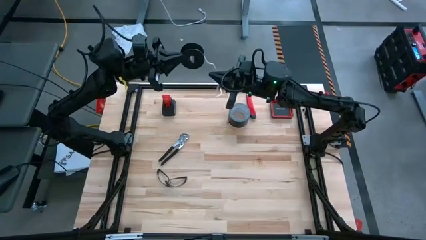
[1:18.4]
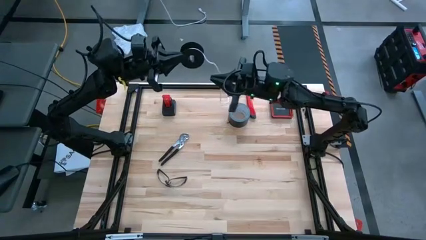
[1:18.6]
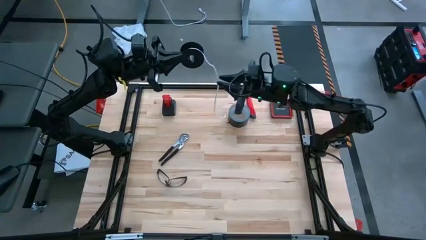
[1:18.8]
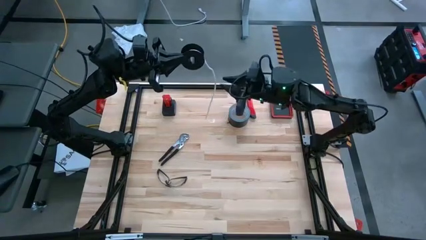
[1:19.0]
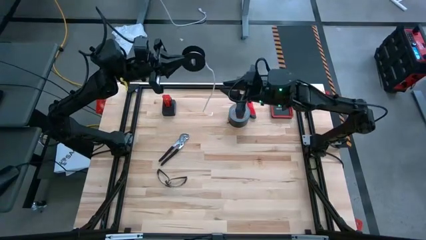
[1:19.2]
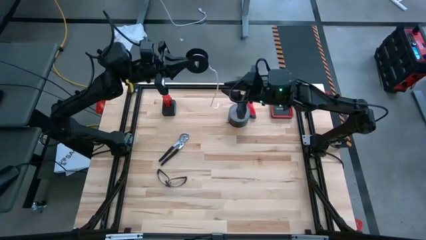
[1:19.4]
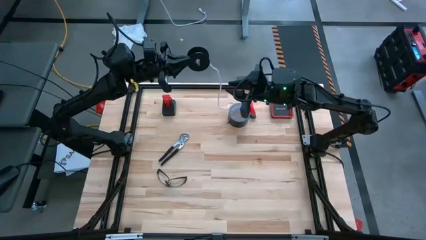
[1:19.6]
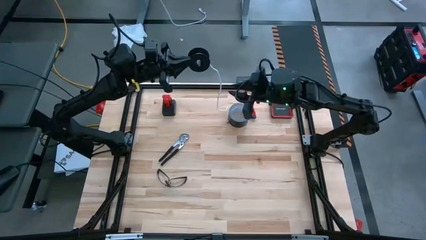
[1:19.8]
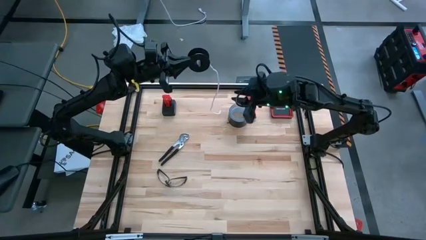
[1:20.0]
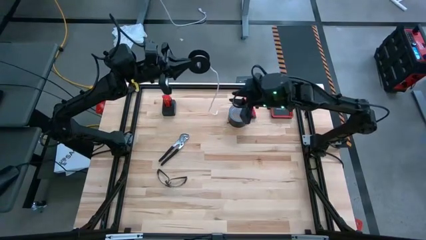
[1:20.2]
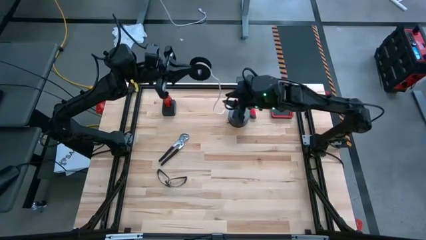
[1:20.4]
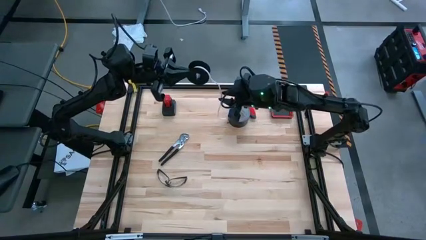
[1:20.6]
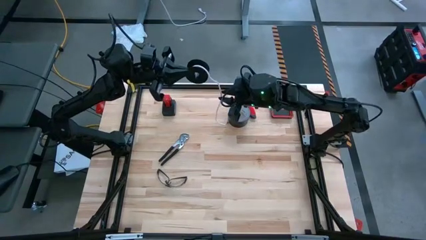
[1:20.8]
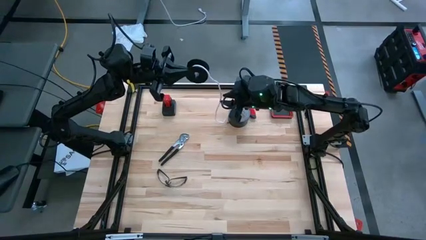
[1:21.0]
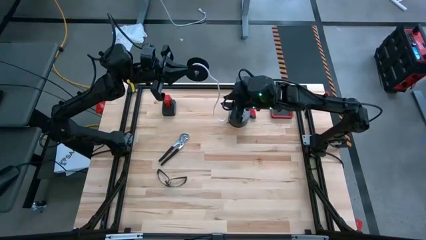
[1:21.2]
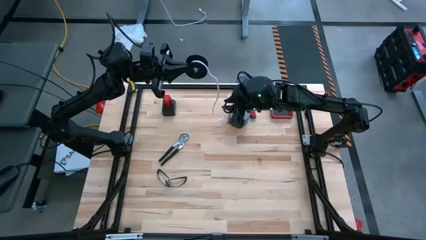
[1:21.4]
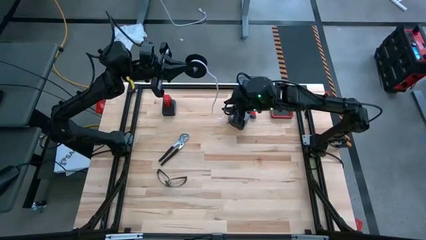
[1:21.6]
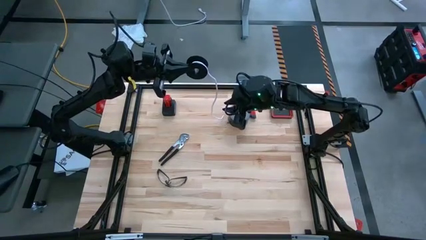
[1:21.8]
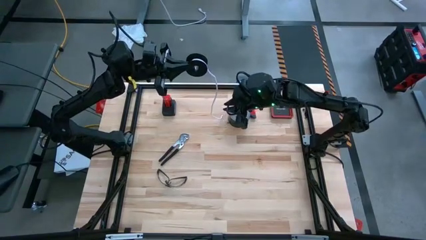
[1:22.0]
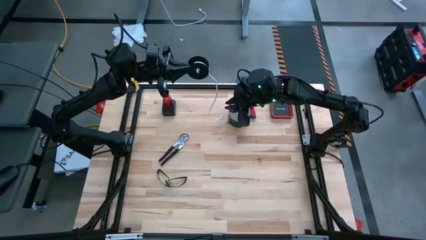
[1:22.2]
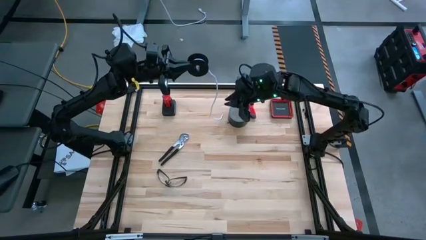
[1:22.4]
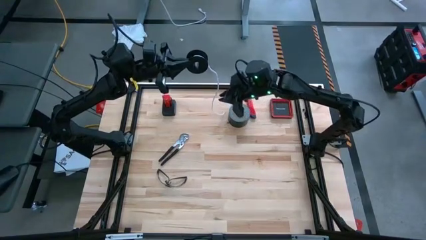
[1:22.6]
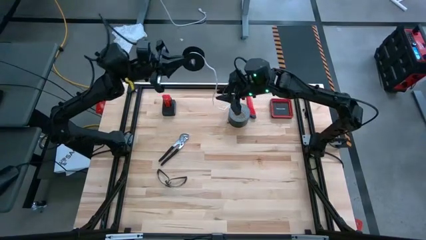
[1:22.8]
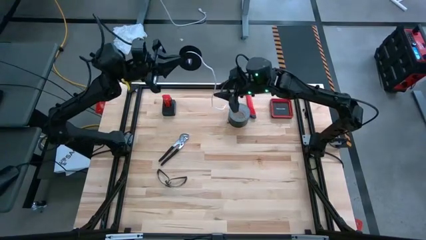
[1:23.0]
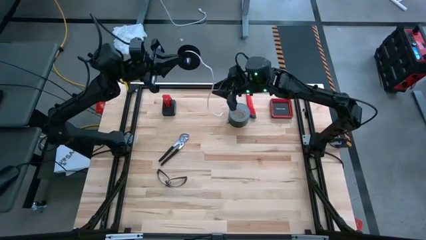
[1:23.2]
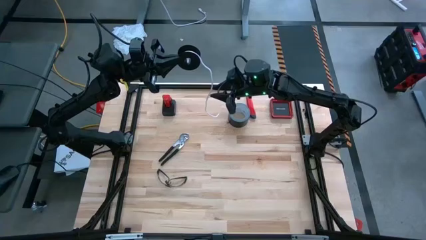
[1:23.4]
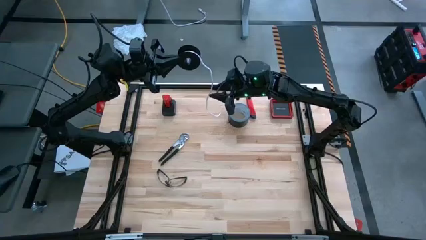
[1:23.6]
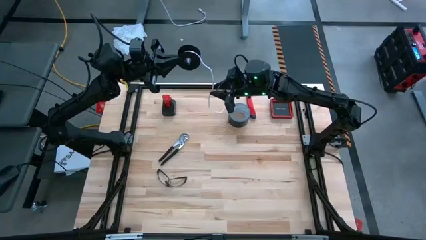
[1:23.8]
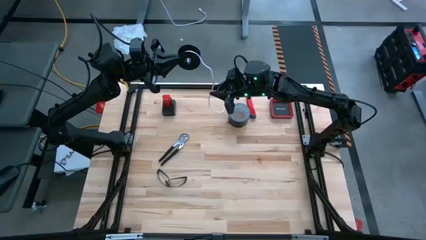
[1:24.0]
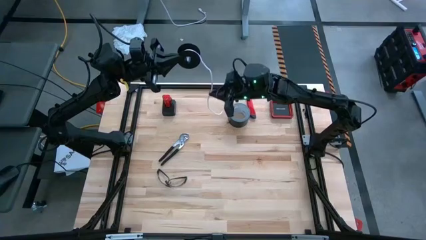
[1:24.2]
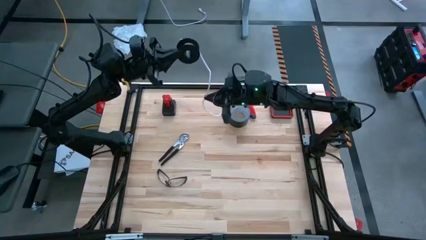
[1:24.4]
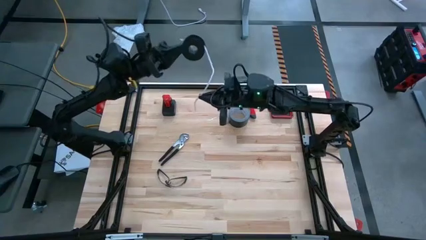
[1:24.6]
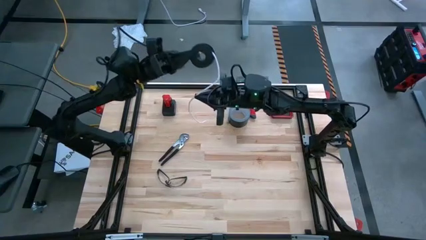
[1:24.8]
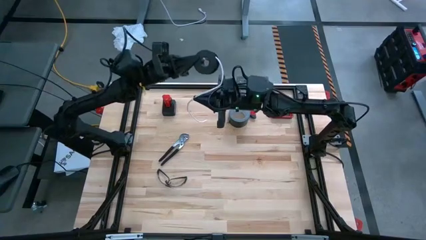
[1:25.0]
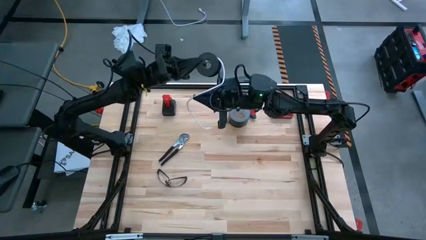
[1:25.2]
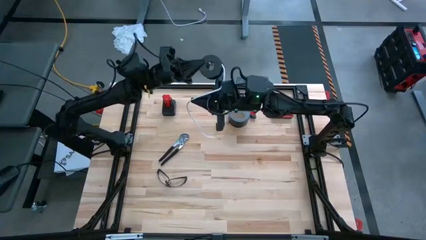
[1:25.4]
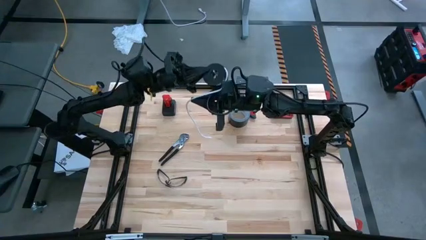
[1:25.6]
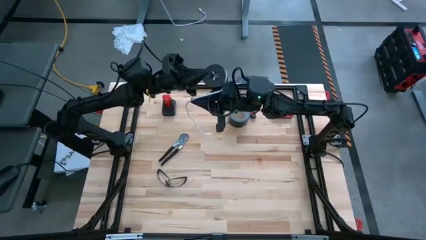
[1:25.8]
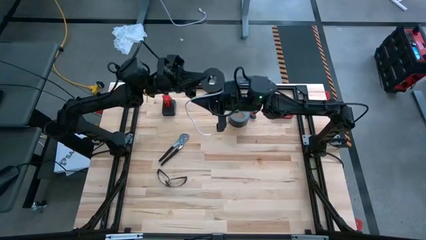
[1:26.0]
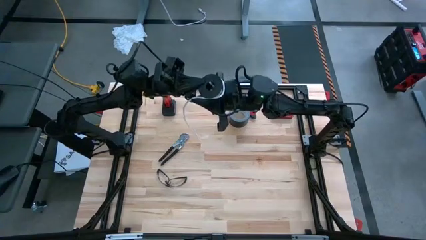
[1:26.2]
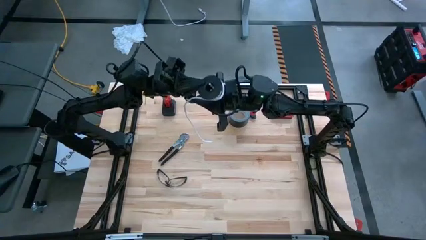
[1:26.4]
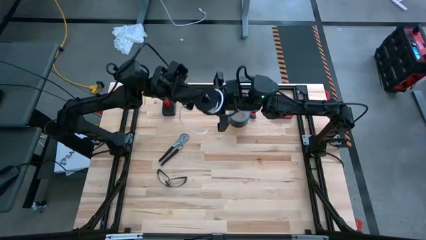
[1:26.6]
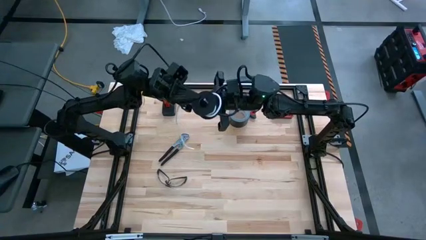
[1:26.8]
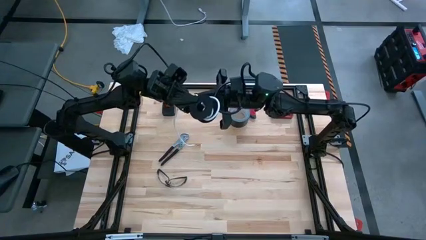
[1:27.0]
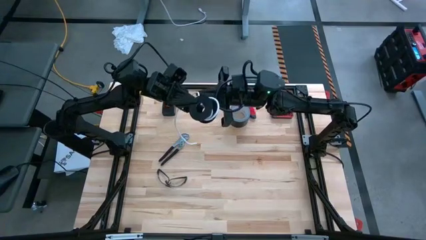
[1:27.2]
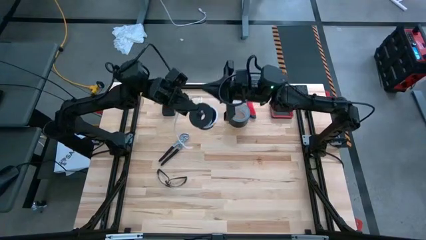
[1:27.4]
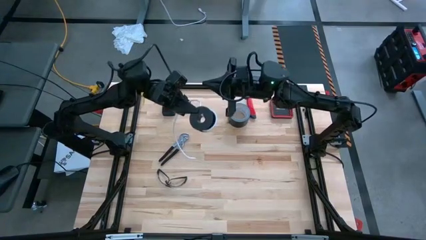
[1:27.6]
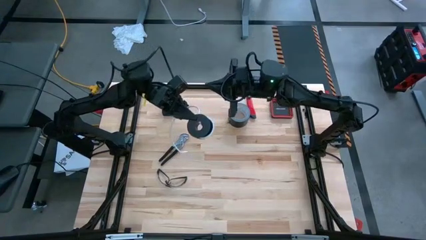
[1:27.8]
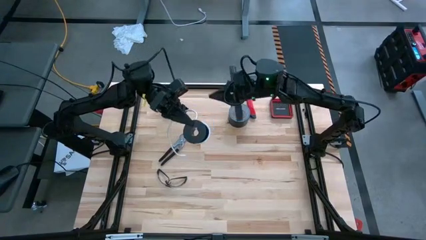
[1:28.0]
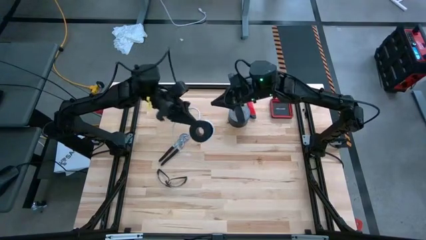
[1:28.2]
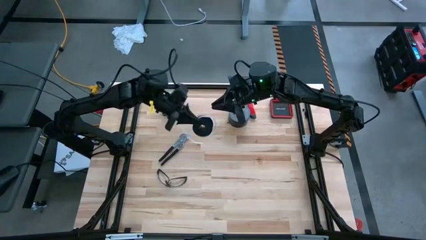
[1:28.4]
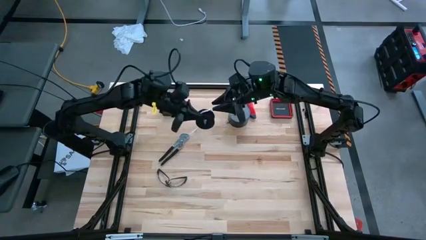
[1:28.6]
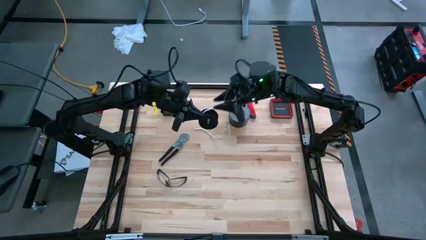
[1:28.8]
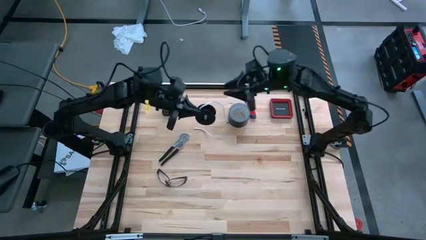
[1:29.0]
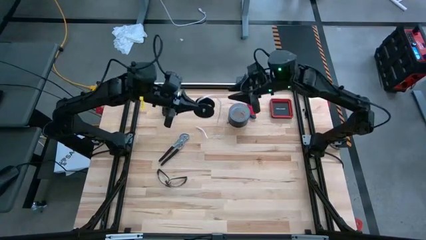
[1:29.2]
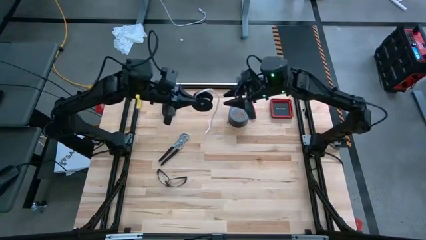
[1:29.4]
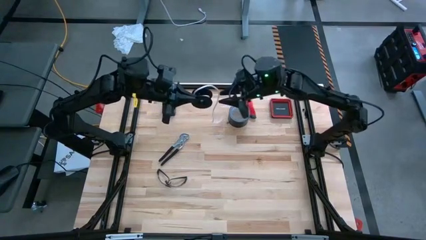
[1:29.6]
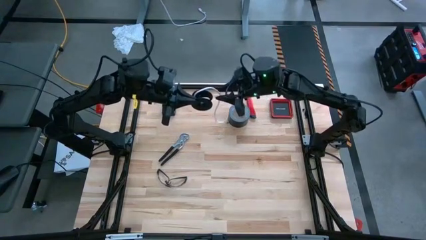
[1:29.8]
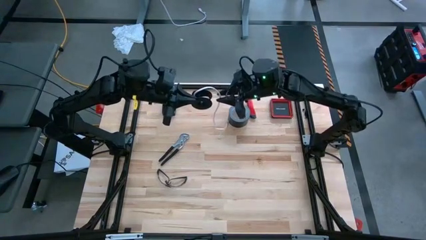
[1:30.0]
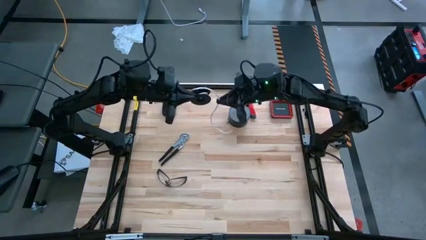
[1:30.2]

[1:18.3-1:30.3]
Task: Coil cords
Coil the white wire onto the black spool

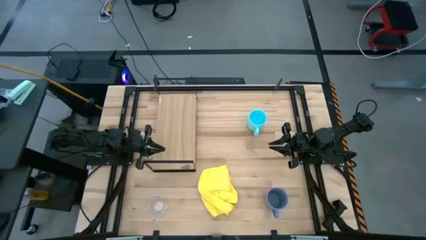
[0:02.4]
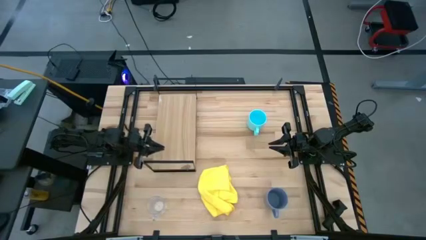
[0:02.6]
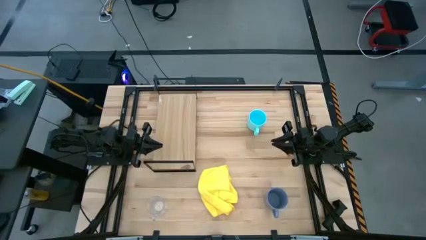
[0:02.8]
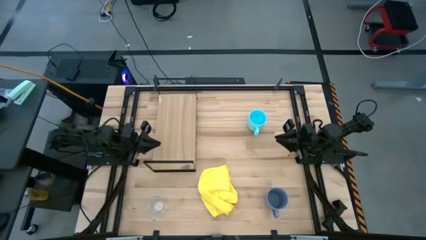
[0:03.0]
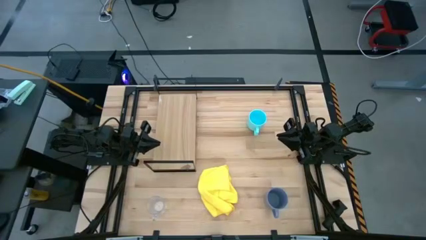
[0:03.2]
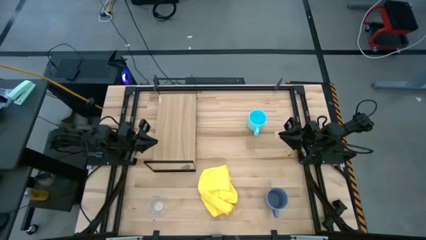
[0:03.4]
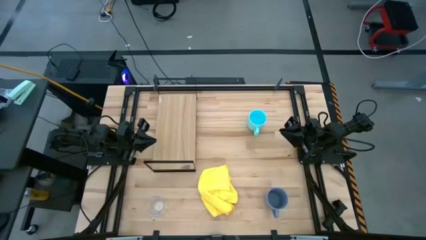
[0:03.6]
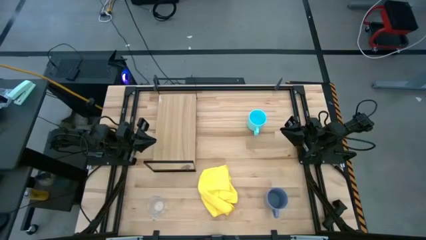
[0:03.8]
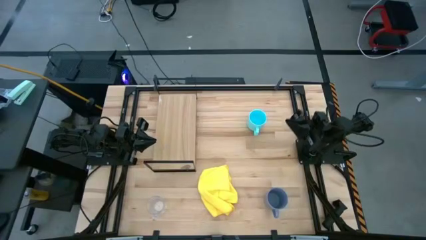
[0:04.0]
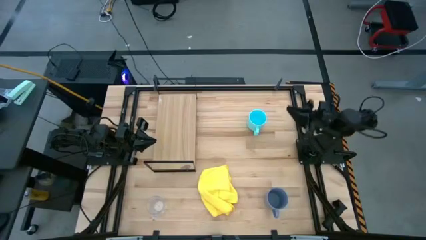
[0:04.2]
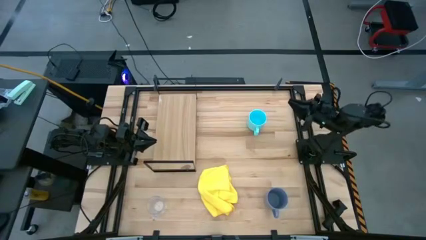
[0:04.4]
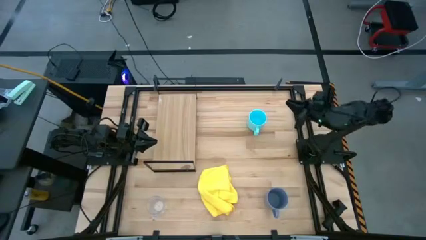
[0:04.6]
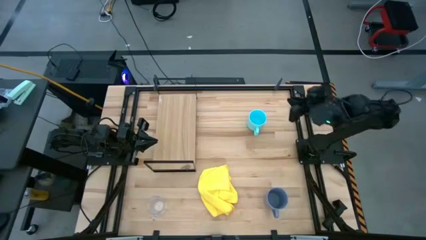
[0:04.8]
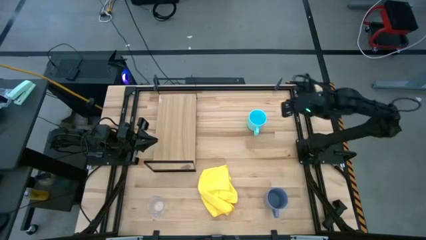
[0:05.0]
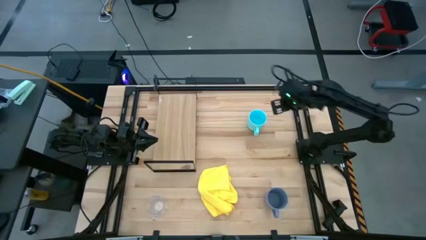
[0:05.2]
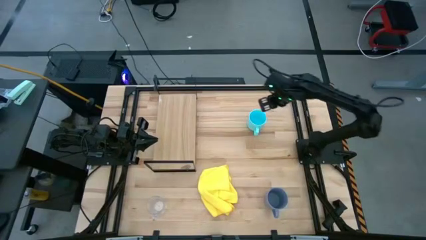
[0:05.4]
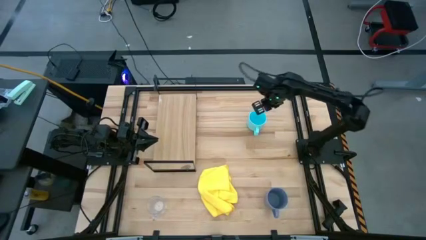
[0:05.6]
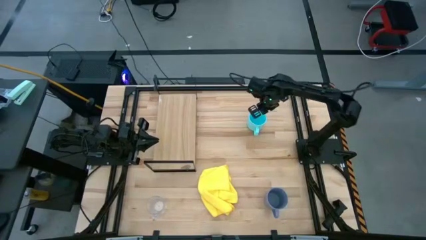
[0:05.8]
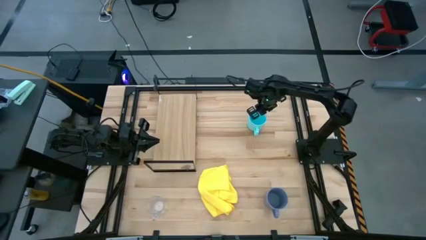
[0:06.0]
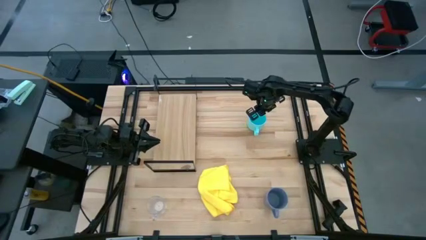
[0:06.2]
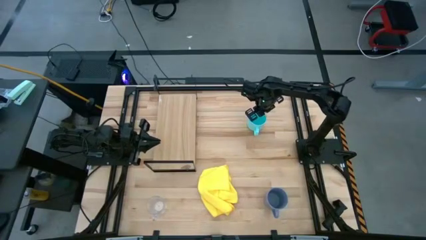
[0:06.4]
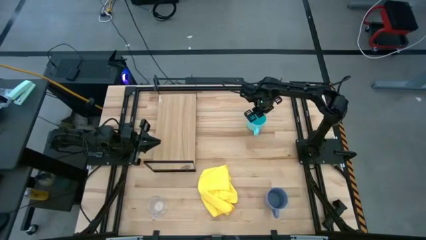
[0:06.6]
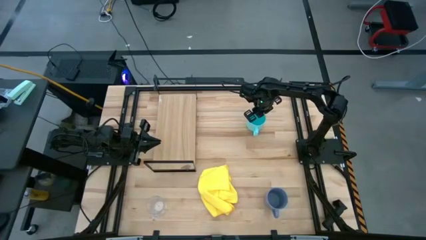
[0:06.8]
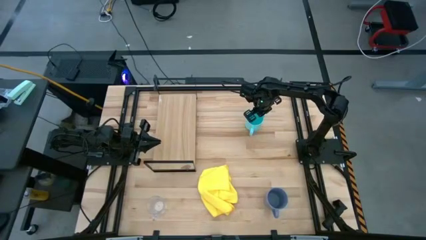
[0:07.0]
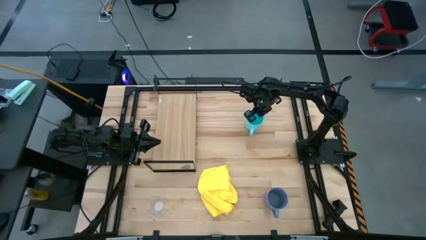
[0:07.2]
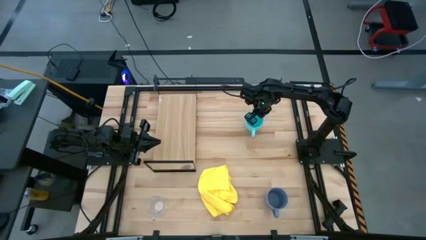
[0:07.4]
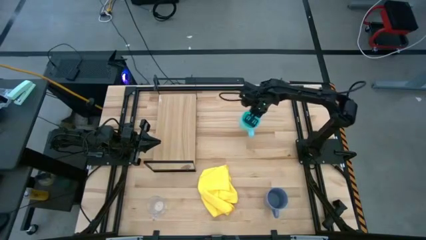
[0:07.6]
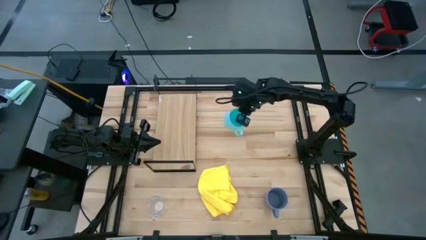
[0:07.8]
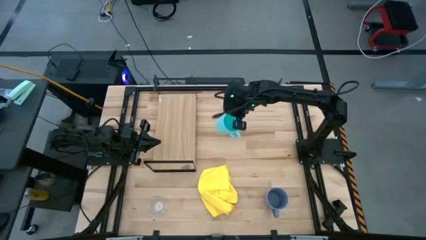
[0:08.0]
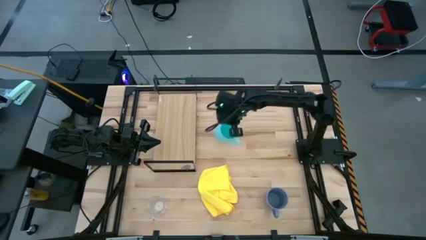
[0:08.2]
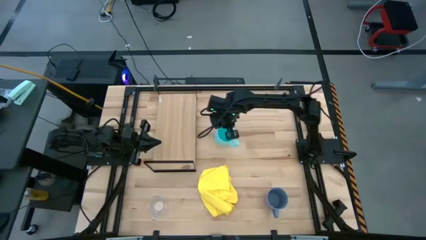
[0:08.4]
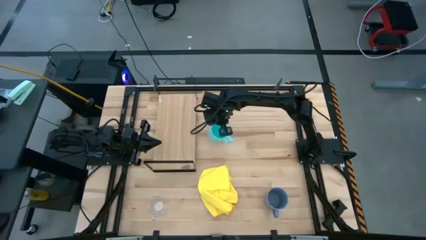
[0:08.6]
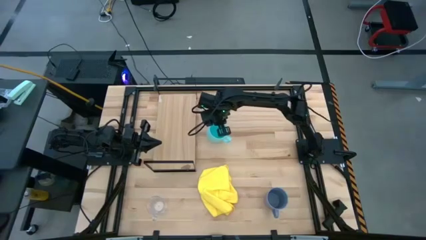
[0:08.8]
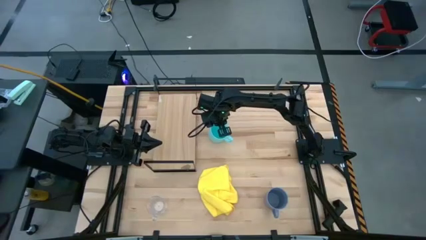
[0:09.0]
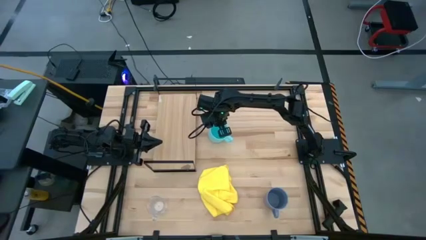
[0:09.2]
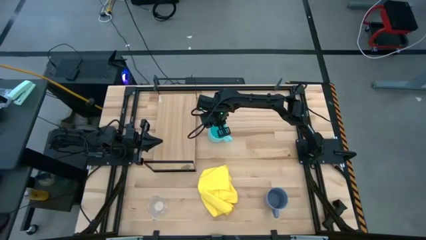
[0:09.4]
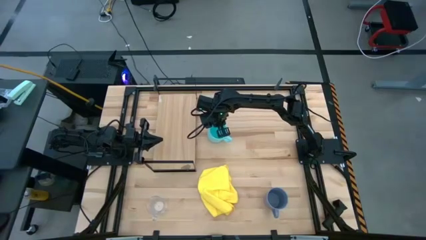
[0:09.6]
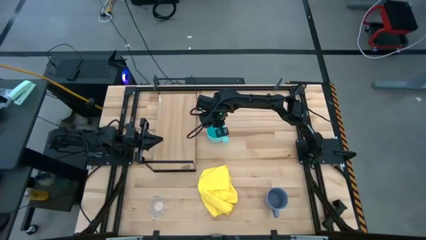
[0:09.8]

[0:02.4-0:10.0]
Task: Stack small to large cups/mugs on shelf
Move the light blue mug
